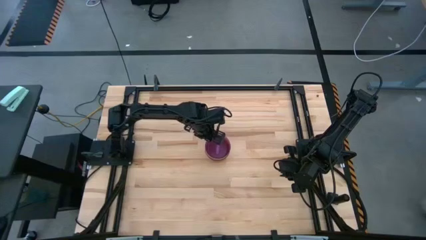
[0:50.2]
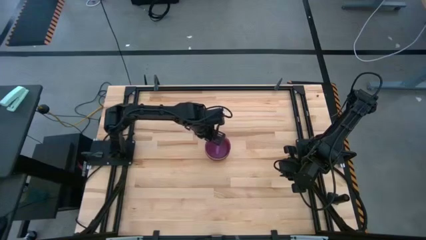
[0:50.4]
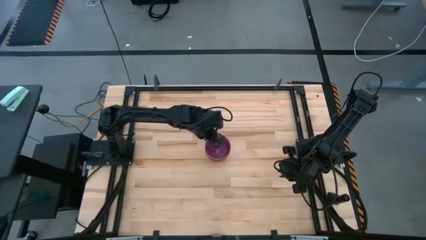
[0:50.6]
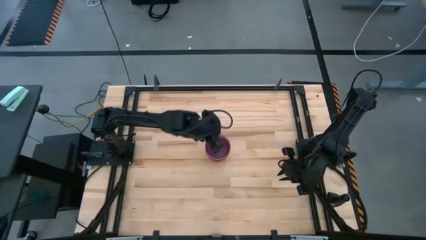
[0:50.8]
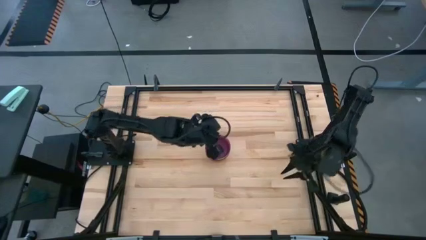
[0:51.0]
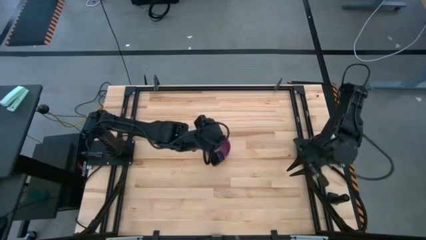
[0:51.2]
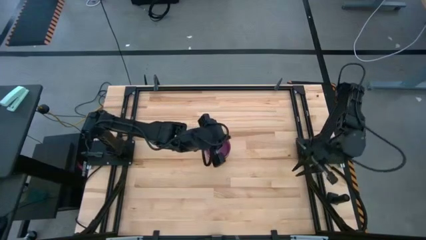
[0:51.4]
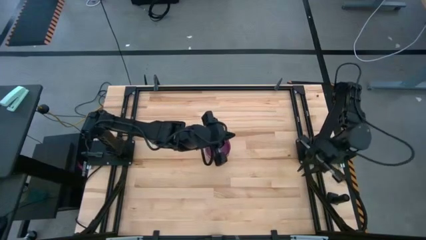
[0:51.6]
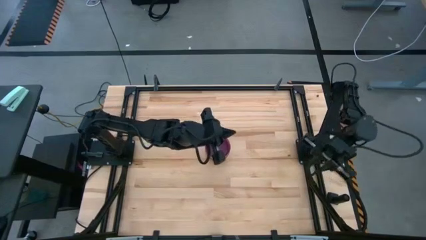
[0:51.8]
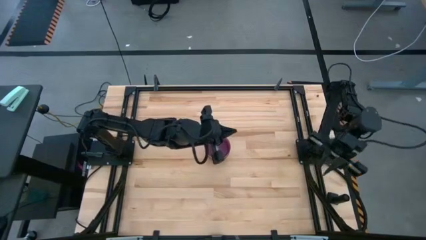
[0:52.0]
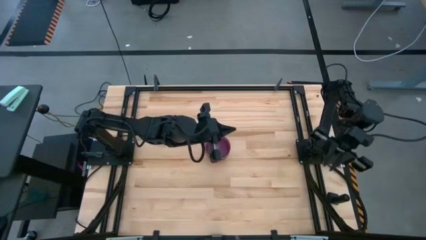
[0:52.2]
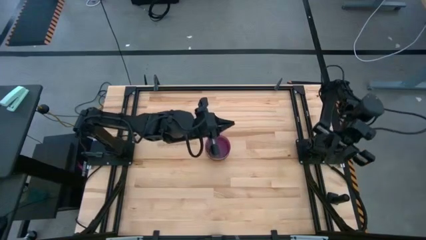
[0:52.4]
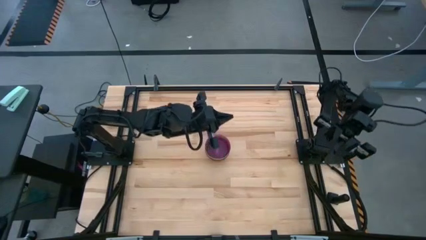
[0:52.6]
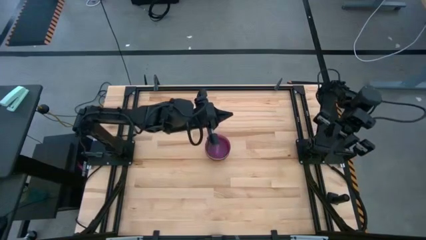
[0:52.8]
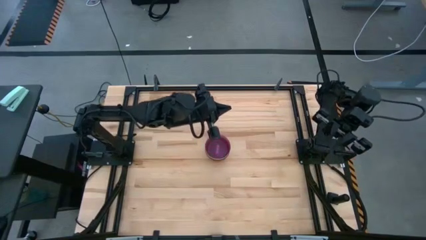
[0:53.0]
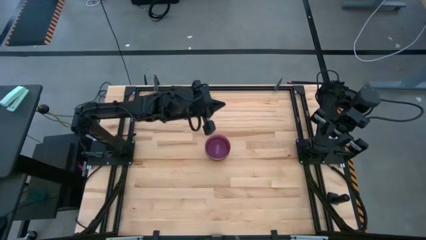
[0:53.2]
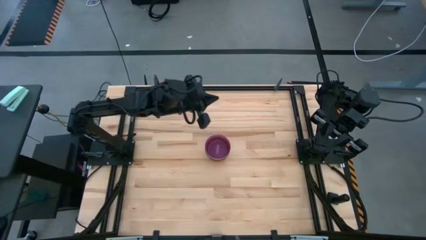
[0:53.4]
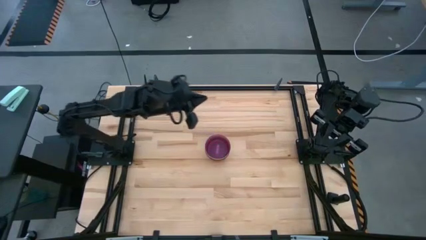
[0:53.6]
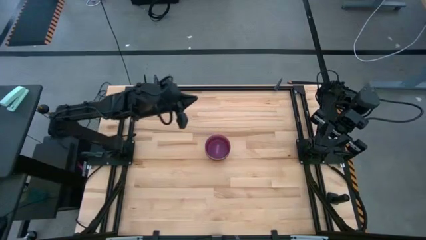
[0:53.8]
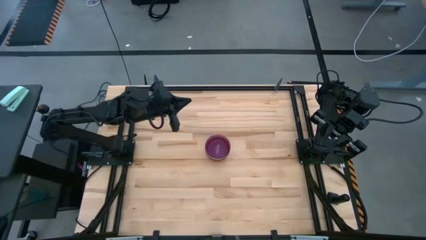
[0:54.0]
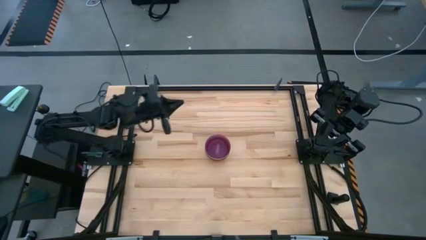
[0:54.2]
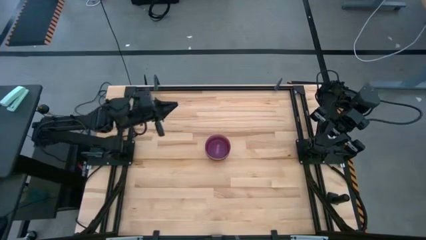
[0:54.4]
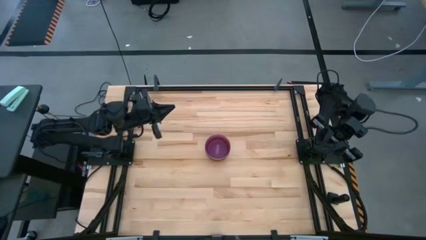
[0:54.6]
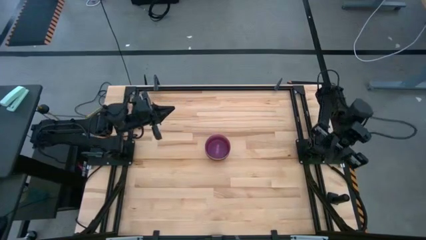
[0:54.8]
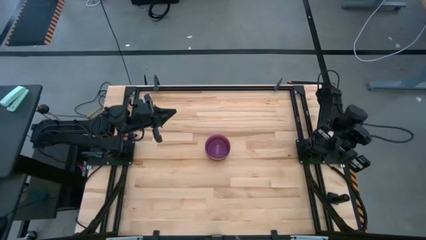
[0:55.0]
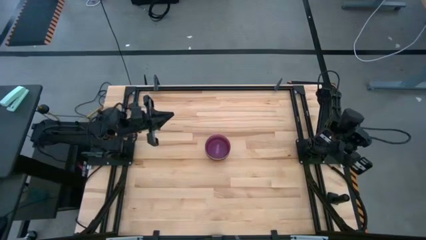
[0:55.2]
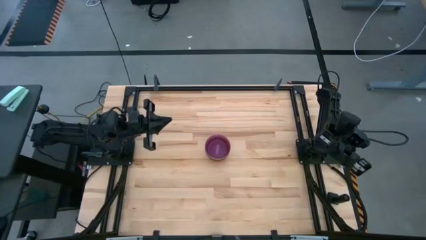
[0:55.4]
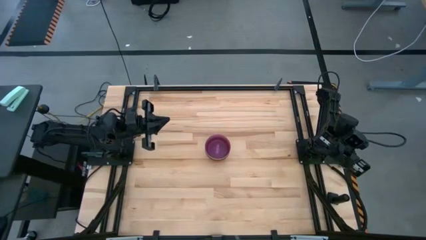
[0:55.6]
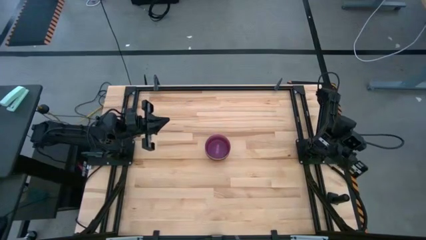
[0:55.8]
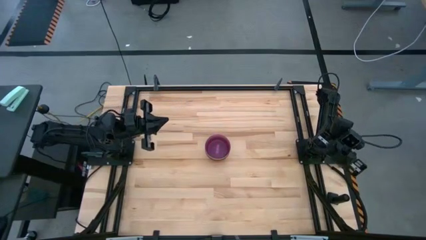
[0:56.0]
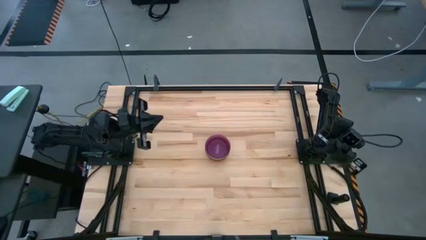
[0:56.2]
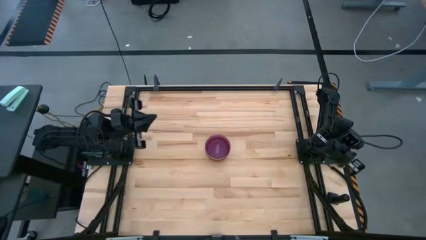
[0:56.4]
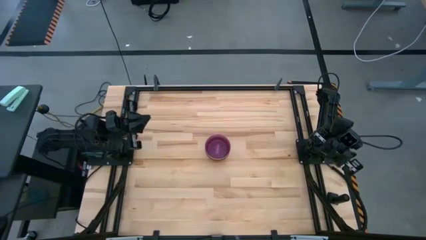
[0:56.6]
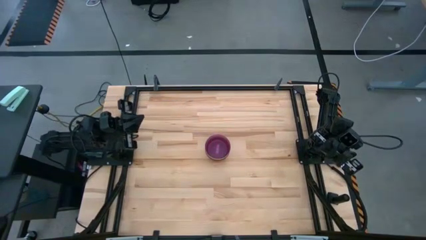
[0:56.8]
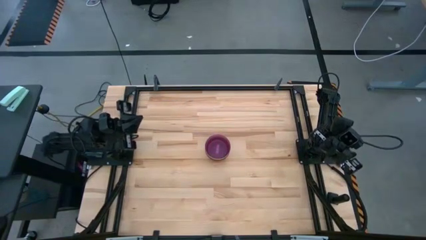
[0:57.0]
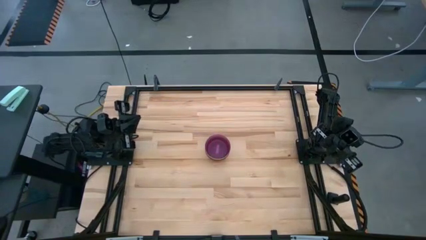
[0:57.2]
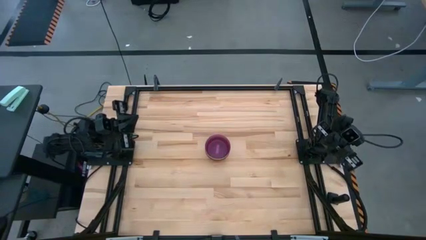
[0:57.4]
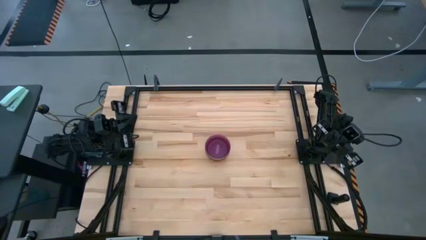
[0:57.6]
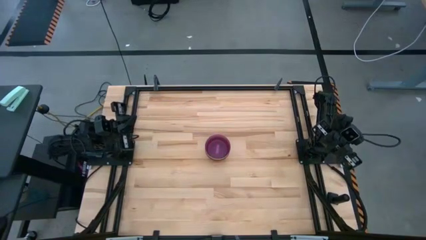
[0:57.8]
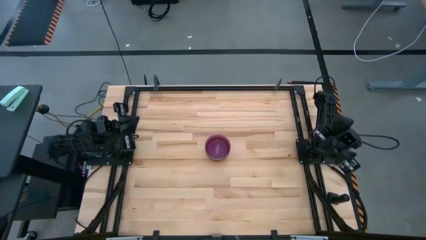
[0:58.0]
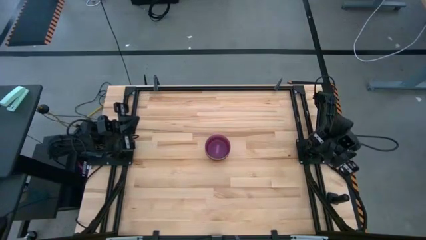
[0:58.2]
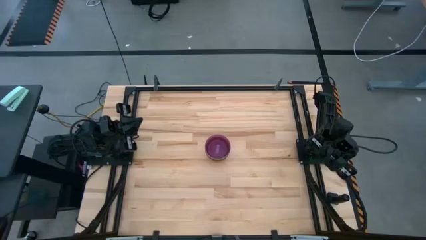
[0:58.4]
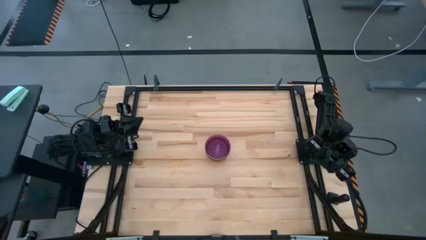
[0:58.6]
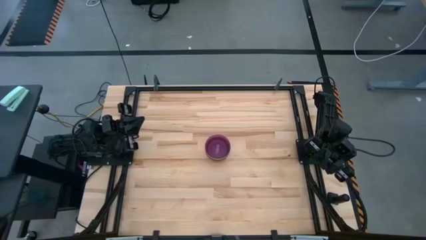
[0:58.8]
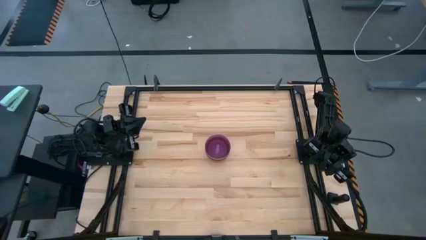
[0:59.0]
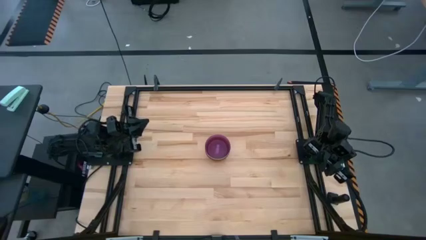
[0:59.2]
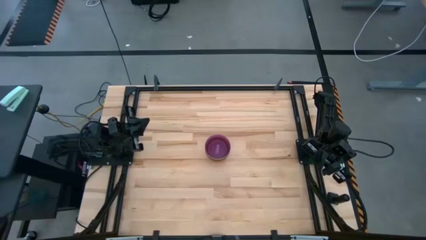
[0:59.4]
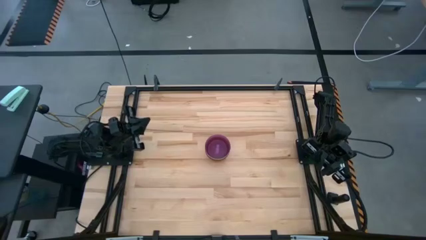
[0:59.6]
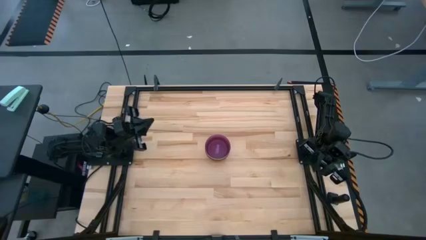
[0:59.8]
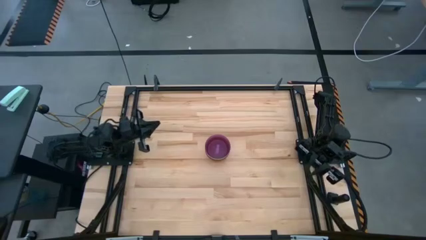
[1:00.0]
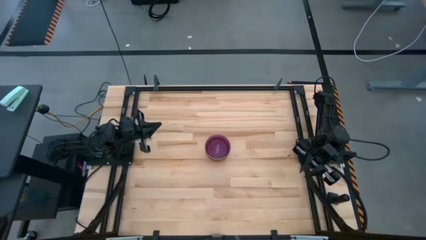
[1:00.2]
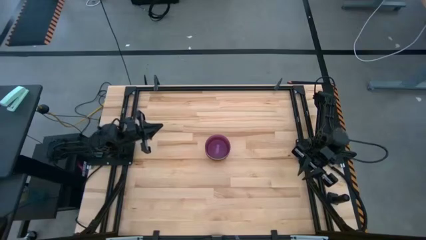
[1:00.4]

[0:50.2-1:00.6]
Task: Nest bowls inside each other
Return to Home Position

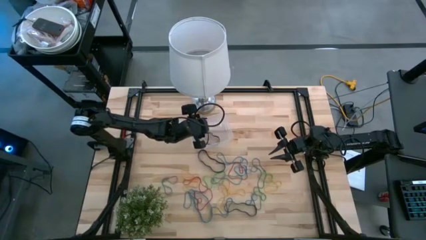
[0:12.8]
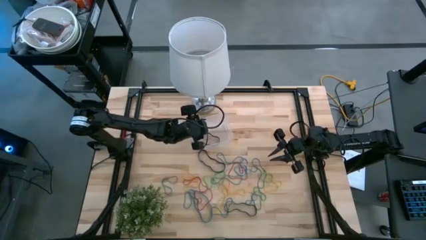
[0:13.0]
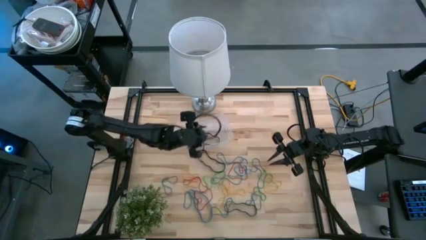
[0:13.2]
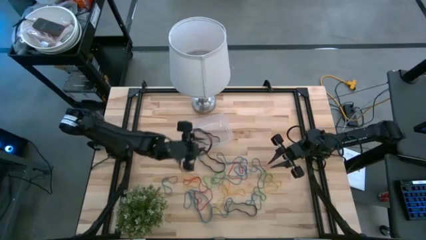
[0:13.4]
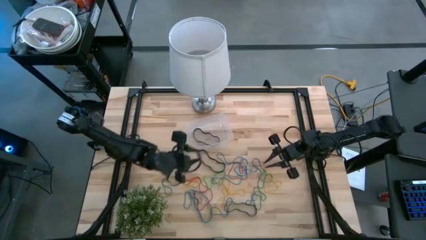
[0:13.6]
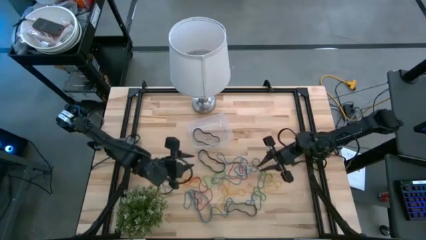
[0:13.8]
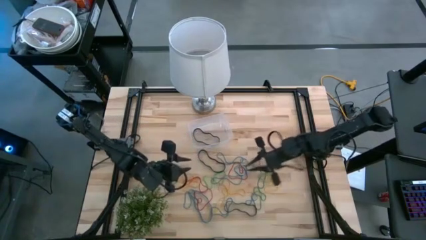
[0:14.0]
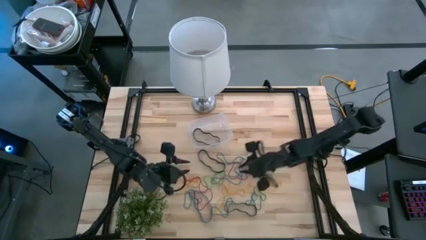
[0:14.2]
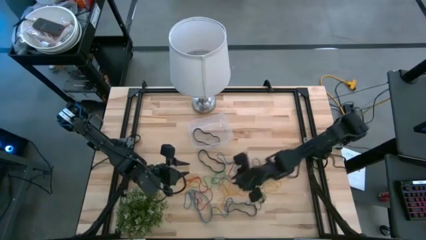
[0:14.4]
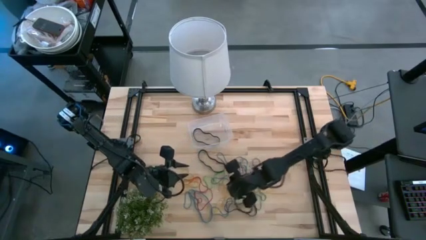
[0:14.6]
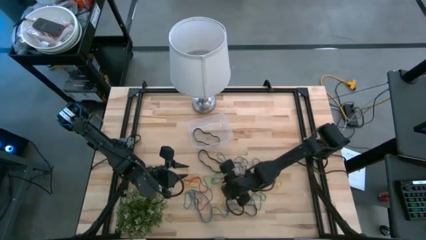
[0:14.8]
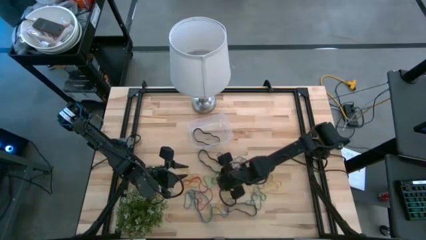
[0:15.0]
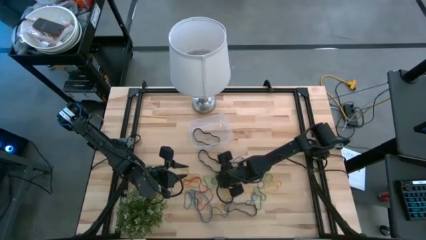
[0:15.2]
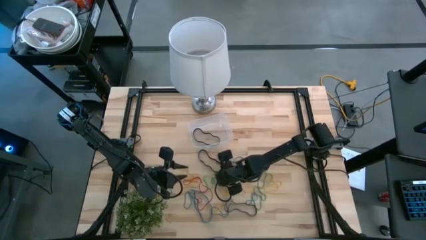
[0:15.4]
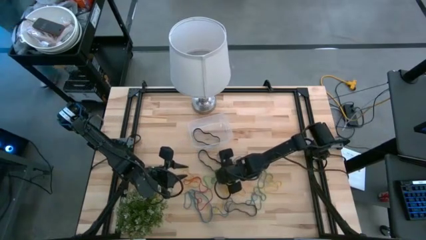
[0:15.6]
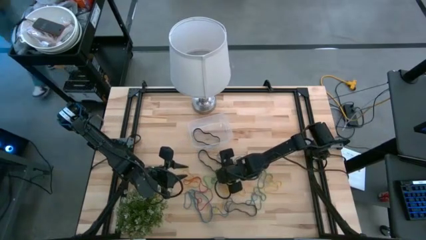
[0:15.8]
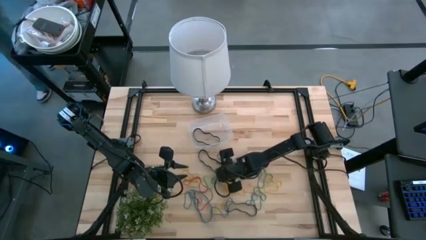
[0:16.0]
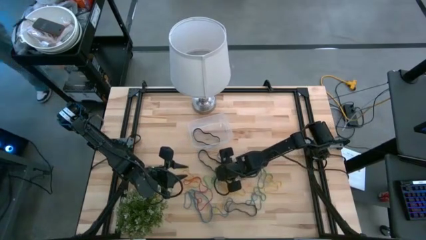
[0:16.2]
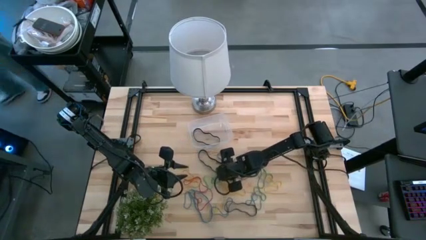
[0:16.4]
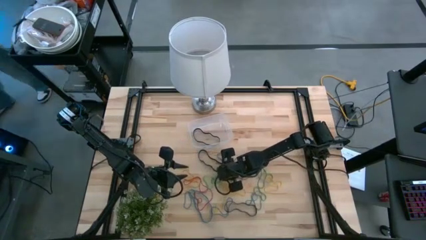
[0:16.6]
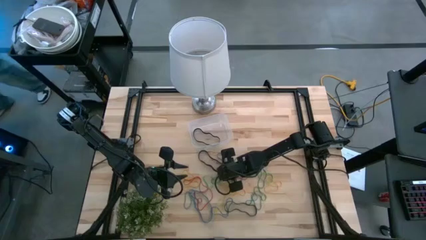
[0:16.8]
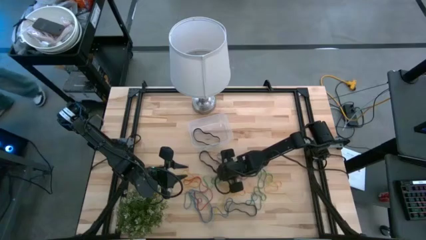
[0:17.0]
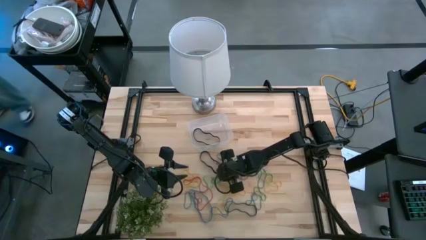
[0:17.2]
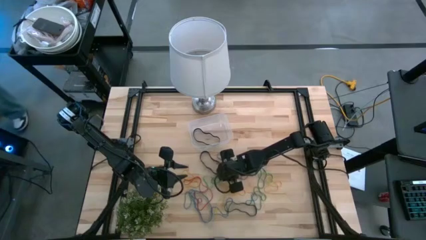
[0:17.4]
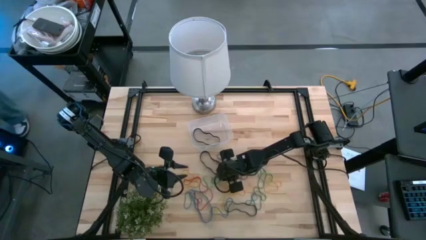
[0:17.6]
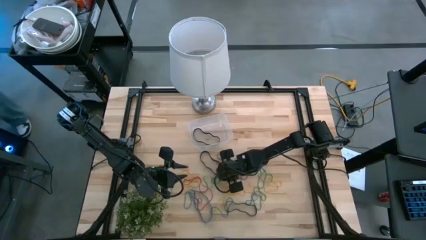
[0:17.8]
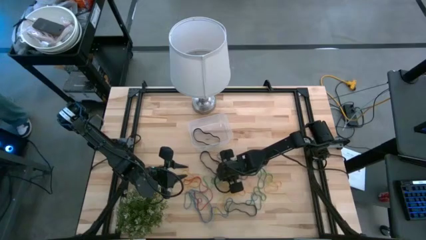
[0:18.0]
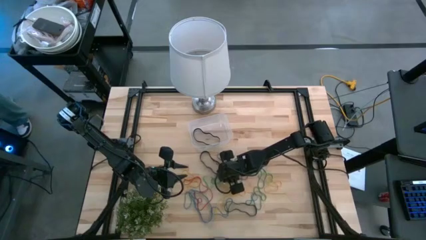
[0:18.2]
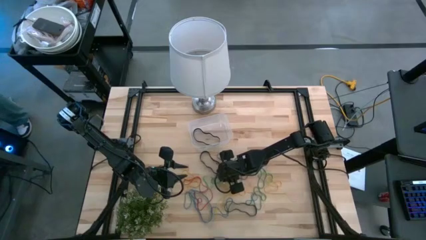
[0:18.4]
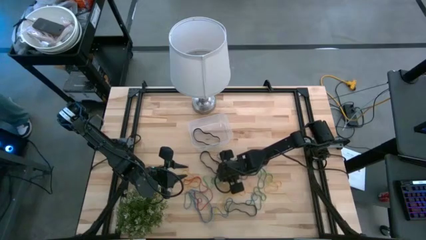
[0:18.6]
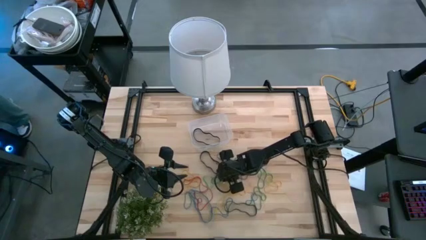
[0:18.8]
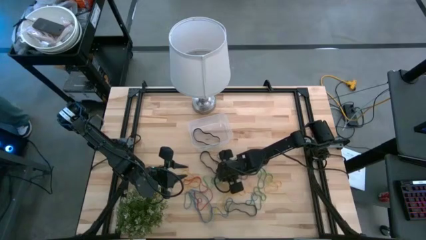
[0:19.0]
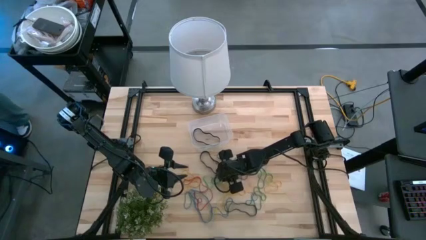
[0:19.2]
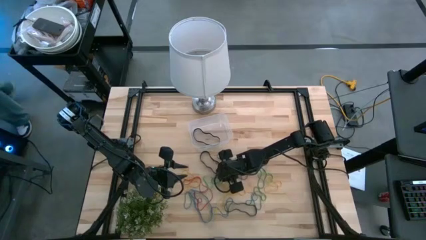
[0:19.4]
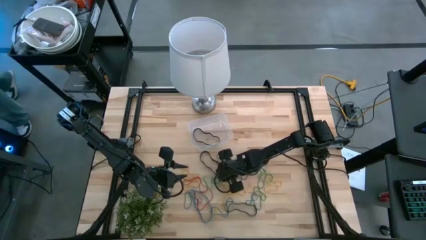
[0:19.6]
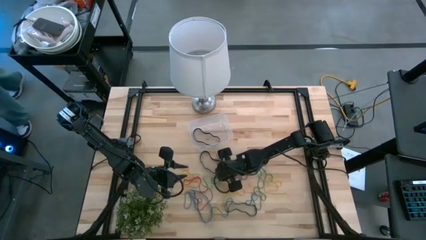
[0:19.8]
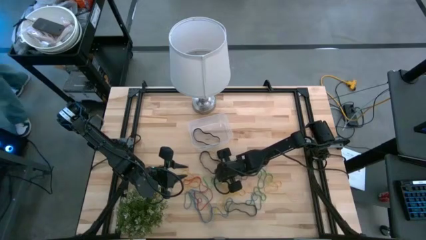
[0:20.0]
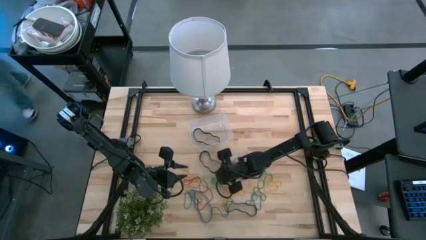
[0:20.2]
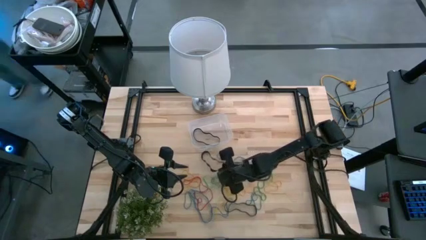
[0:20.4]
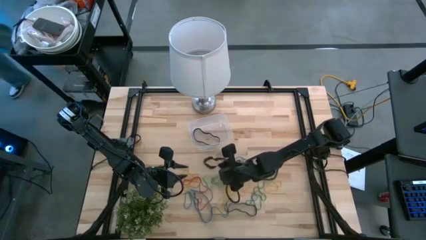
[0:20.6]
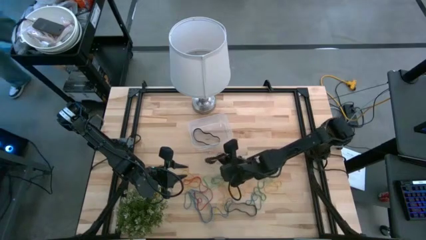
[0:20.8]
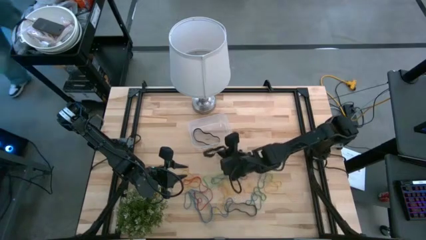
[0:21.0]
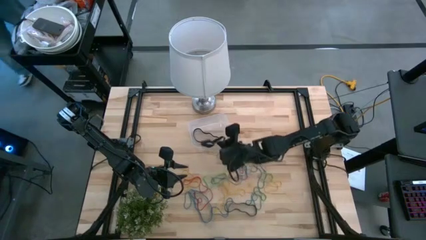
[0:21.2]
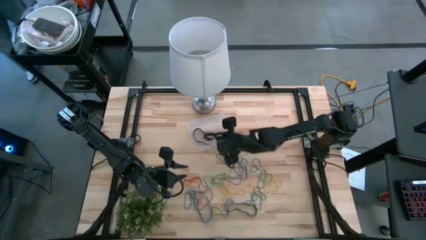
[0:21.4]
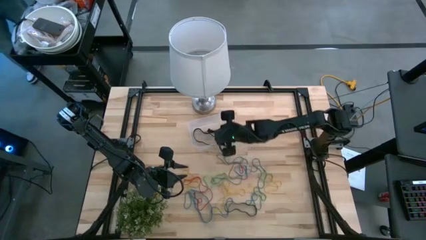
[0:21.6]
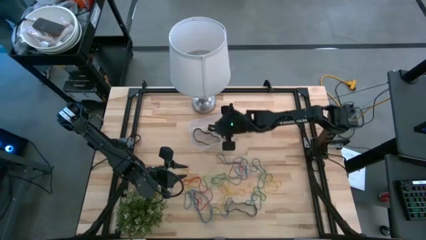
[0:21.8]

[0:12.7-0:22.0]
Task: Pick and place rubber bands into bin
Put the black rubber band into the transparent container
